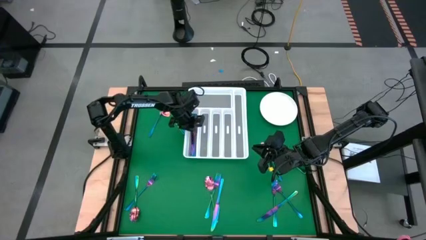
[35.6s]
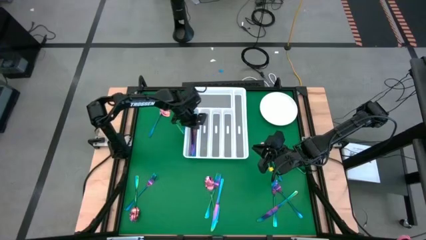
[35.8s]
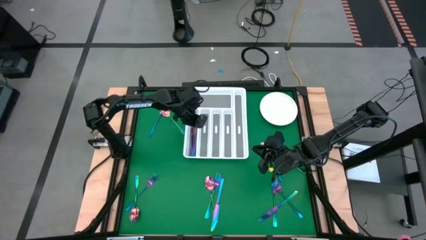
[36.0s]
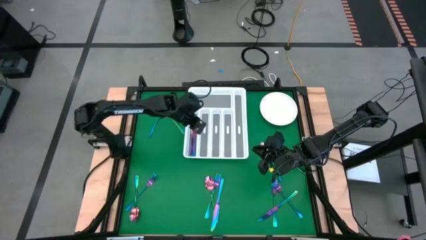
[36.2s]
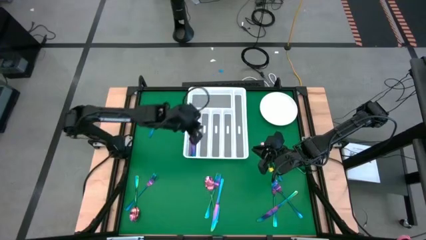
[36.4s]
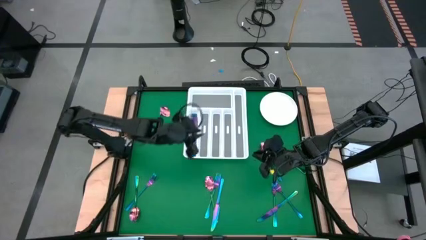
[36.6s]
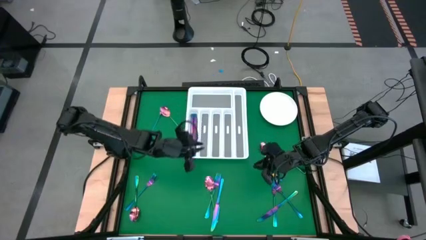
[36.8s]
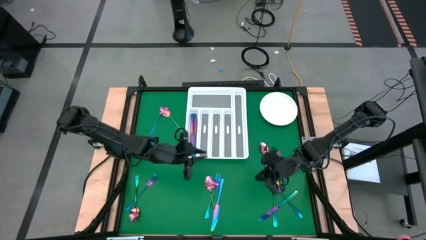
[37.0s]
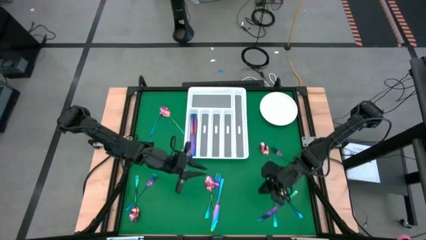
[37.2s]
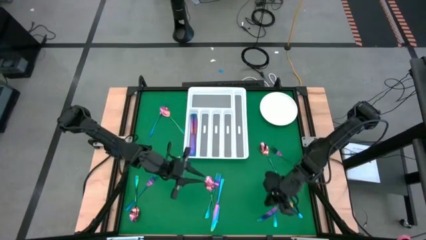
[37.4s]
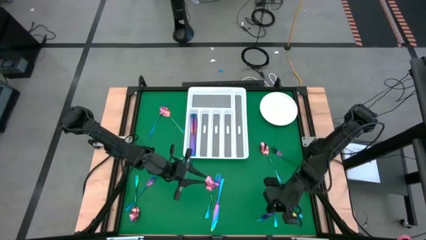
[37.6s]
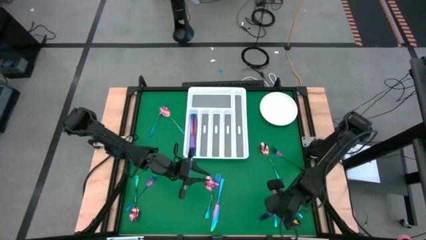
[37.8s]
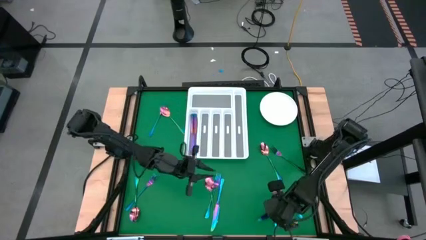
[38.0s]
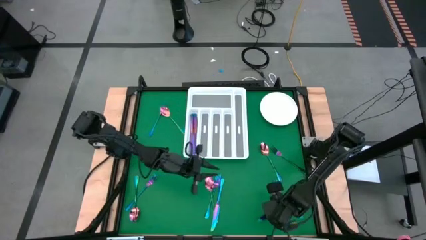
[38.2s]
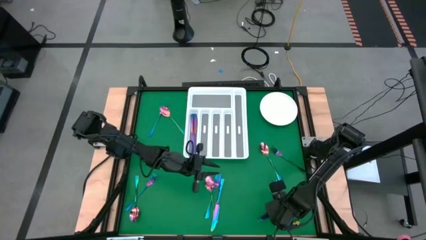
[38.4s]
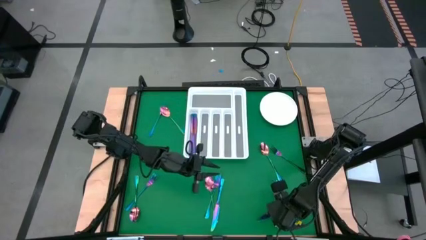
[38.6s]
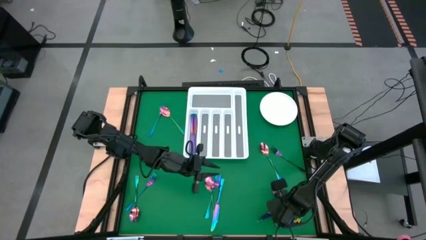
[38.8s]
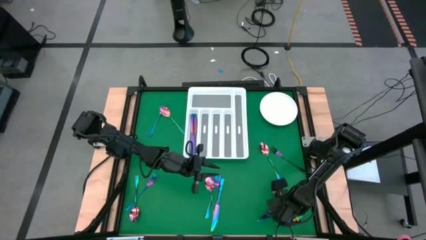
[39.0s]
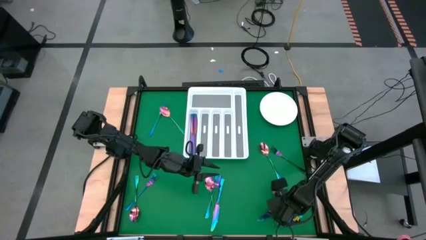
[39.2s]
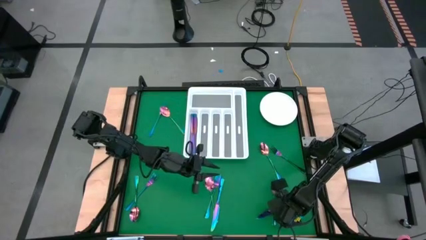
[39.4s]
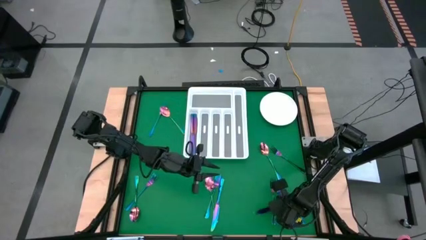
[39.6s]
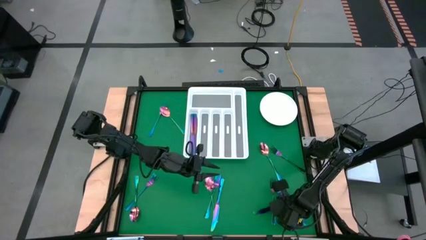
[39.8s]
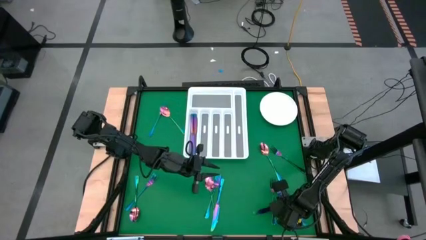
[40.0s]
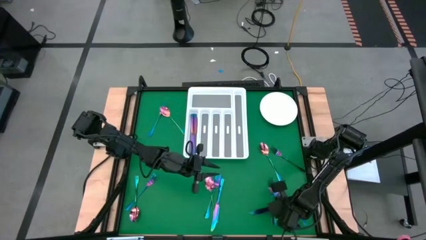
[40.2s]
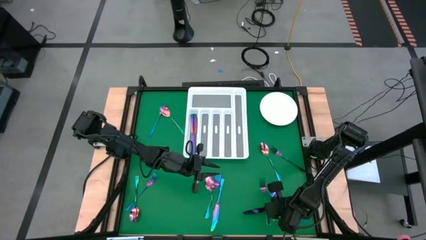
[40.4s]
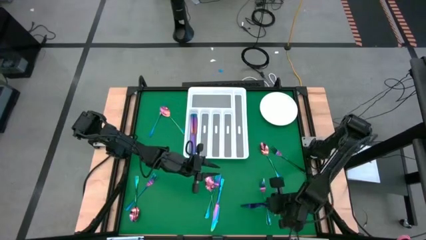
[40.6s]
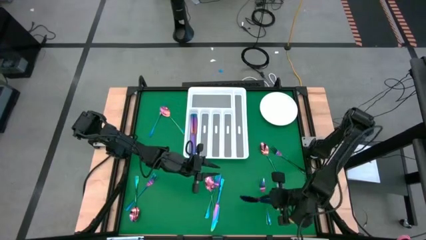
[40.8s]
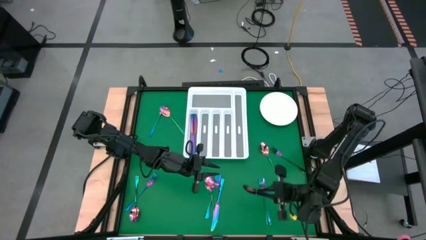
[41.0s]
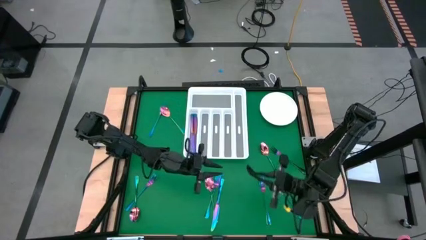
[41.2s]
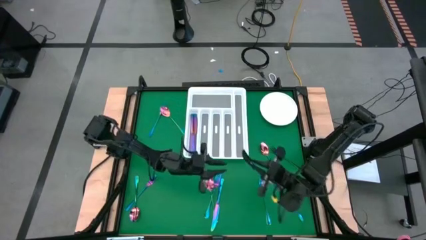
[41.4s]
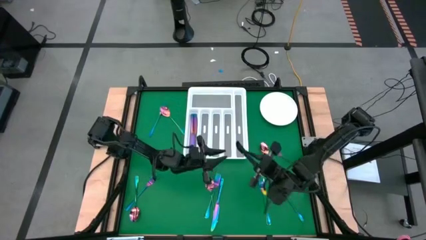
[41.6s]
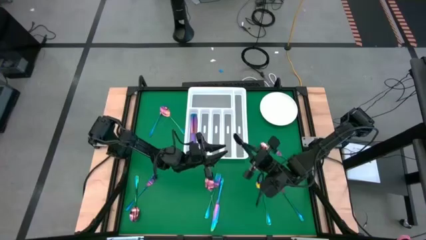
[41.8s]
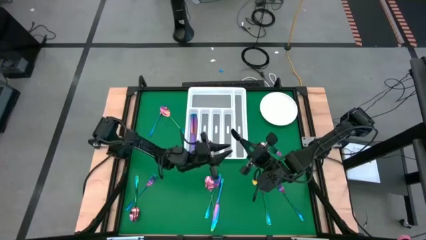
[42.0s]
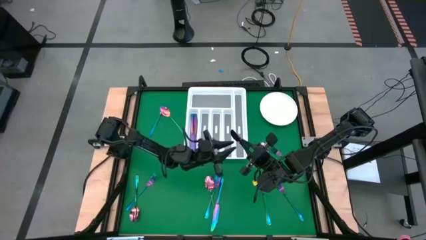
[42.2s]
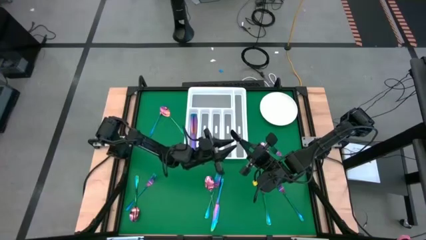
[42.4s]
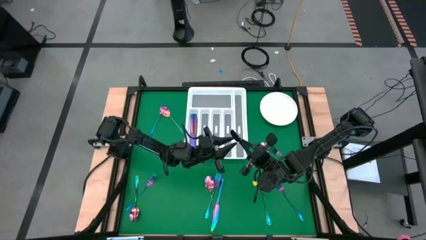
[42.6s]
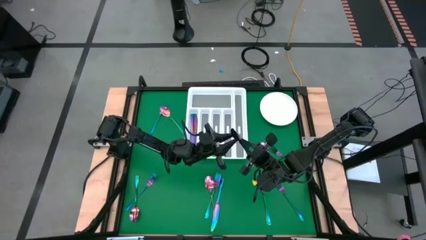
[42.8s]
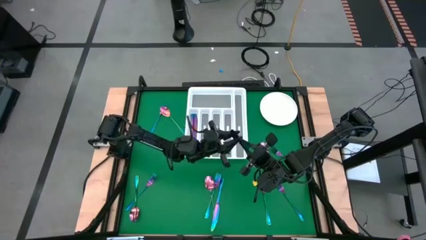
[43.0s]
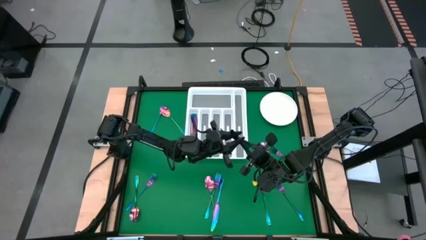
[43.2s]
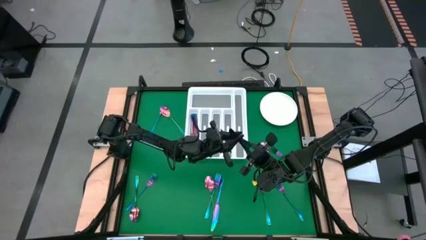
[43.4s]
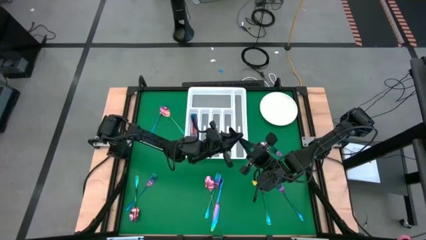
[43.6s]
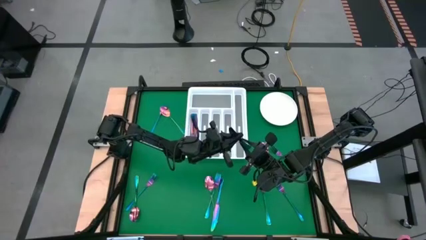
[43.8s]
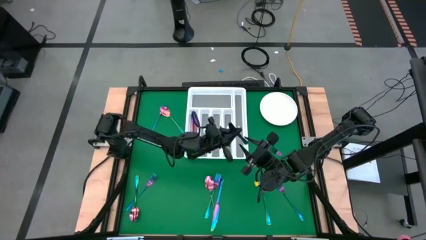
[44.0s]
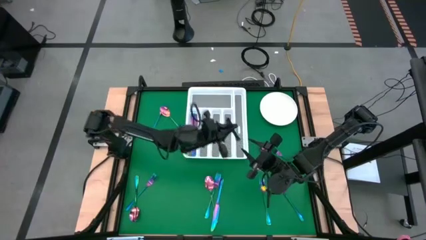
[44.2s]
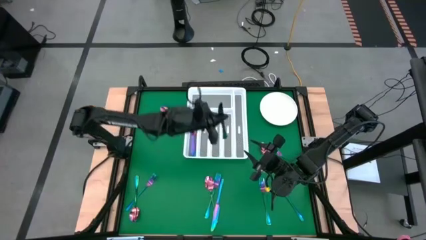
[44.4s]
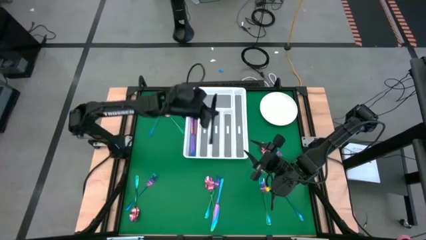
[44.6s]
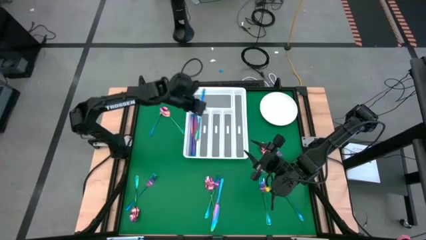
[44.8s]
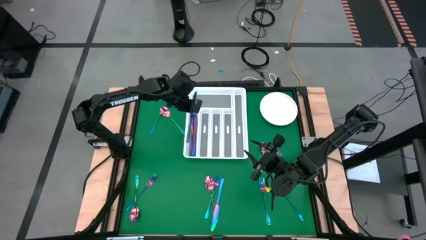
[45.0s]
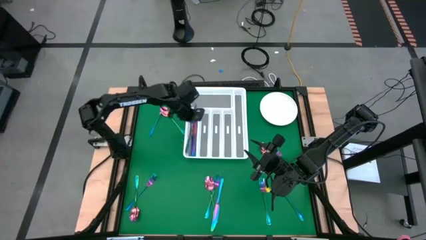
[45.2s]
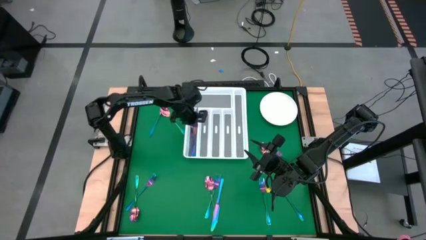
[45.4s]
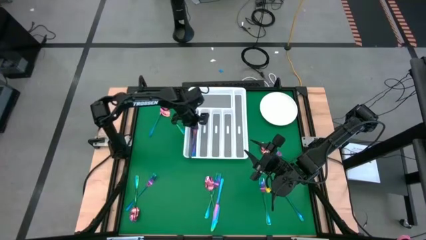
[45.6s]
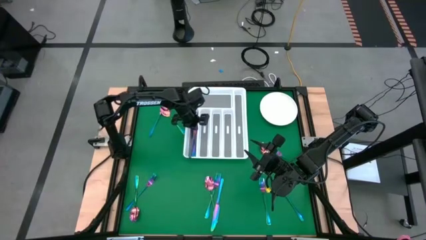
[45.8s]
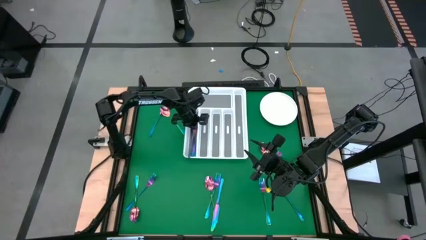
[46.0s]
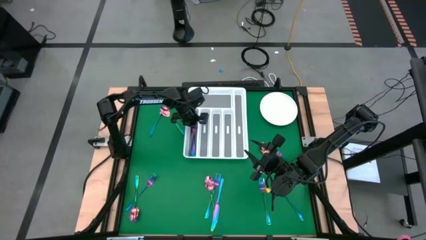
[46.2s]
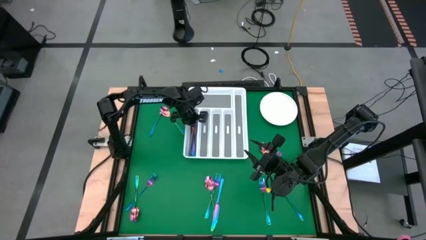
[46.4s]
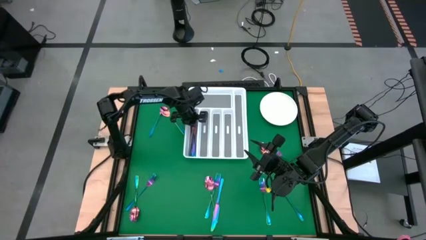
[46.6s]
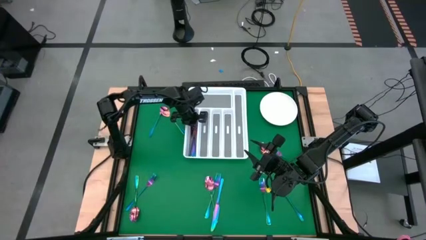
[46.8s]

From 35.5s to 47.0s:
Task: Sort silverware
Put the blue table knife into the silverware tray
